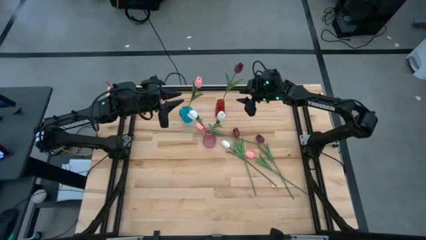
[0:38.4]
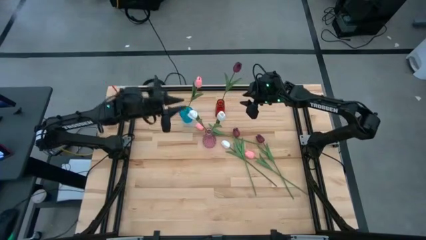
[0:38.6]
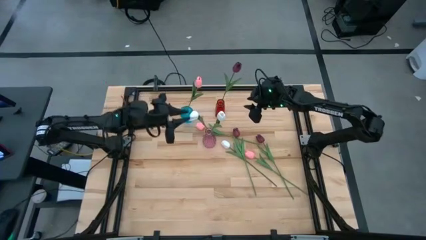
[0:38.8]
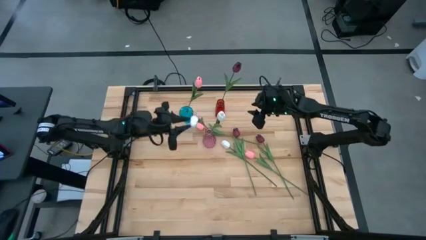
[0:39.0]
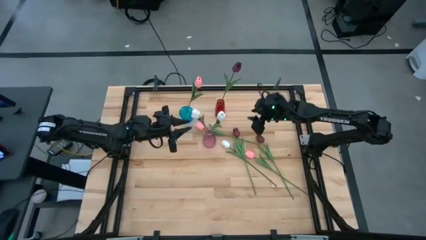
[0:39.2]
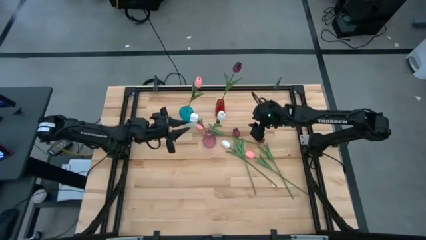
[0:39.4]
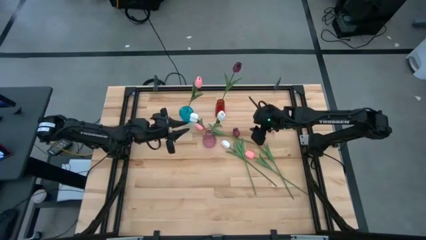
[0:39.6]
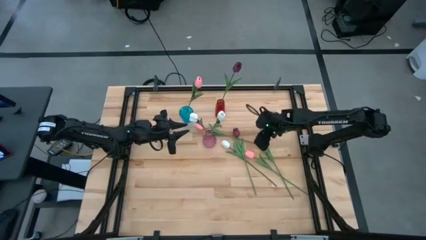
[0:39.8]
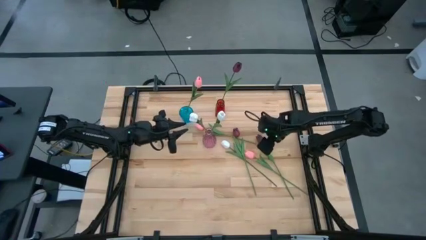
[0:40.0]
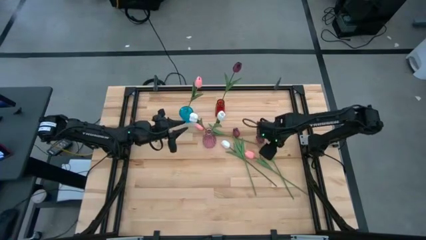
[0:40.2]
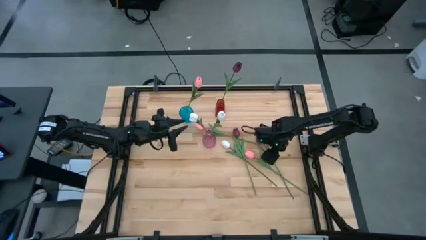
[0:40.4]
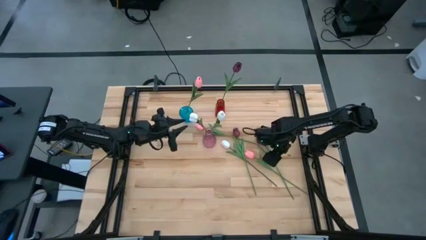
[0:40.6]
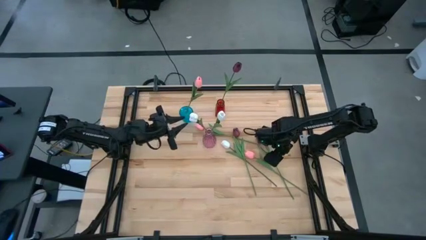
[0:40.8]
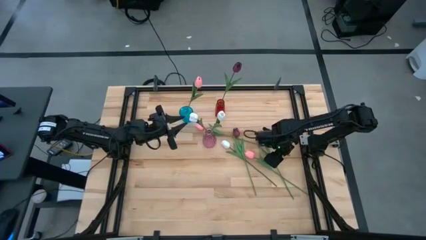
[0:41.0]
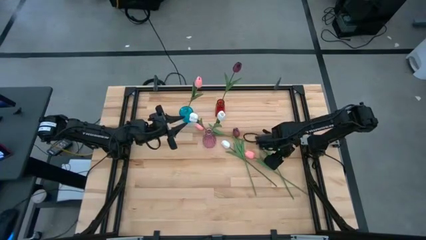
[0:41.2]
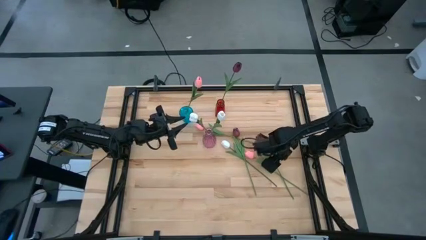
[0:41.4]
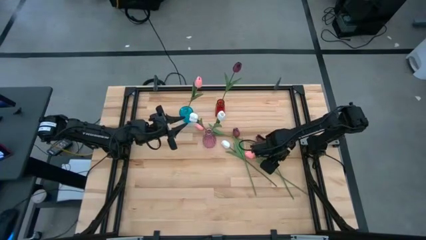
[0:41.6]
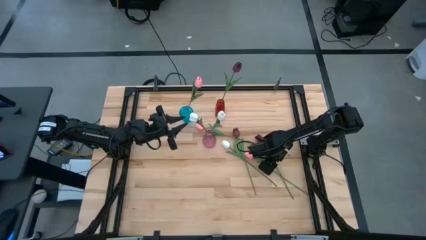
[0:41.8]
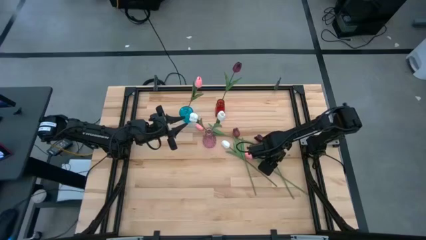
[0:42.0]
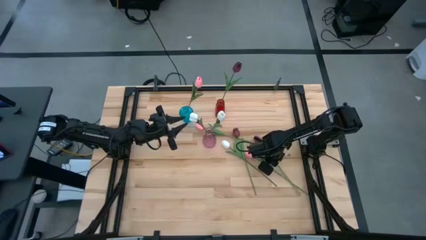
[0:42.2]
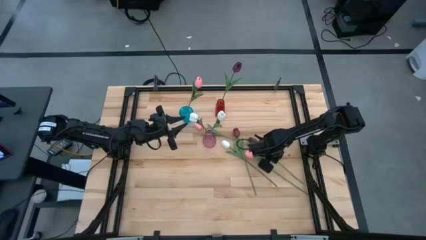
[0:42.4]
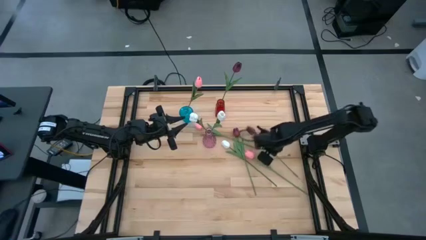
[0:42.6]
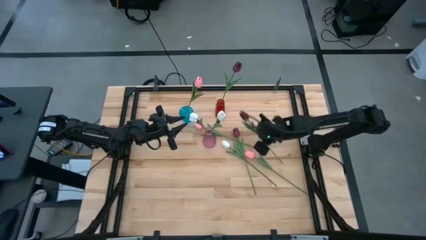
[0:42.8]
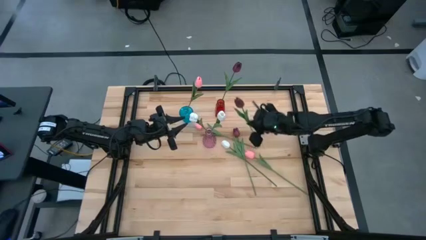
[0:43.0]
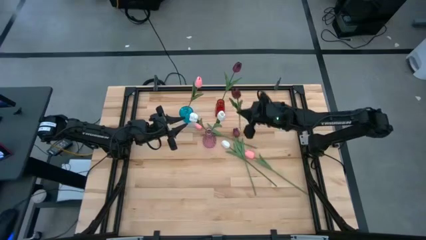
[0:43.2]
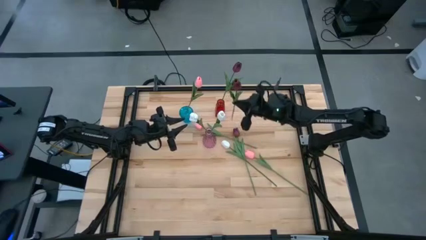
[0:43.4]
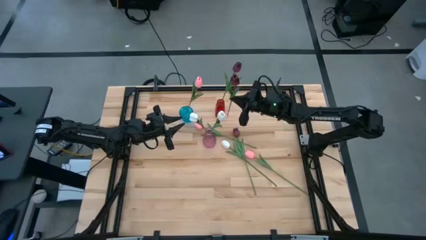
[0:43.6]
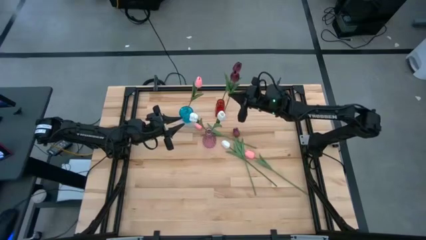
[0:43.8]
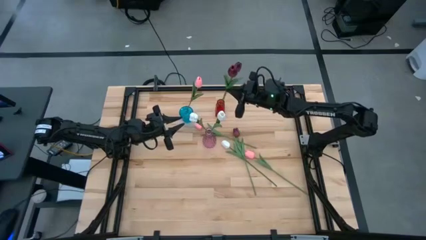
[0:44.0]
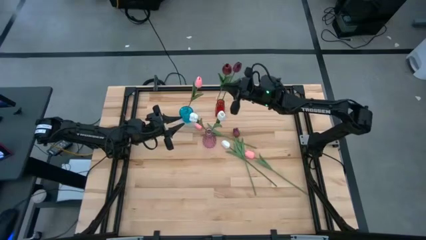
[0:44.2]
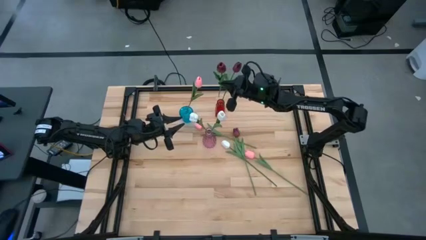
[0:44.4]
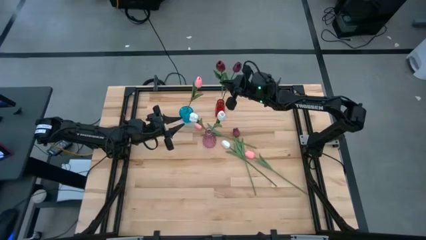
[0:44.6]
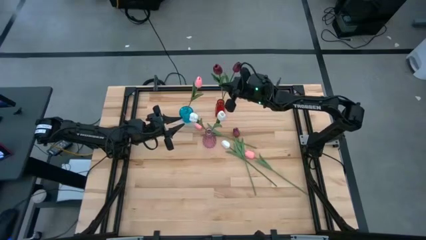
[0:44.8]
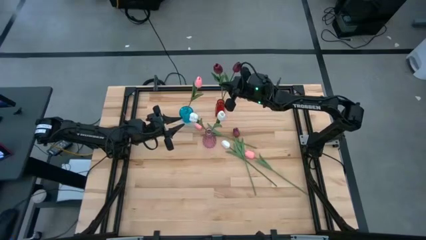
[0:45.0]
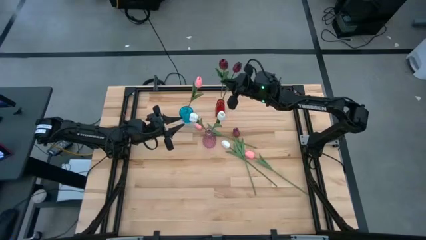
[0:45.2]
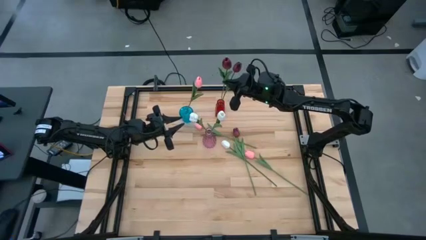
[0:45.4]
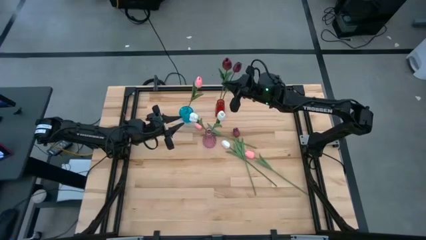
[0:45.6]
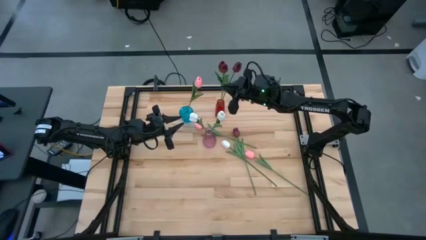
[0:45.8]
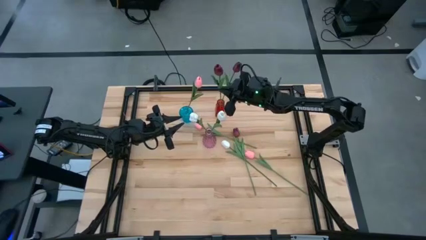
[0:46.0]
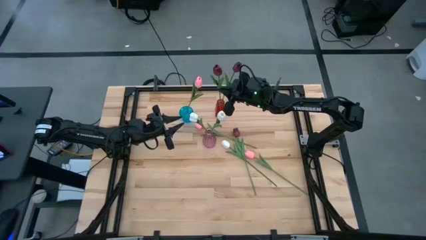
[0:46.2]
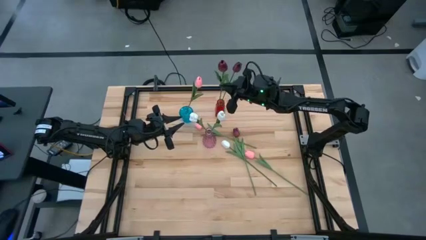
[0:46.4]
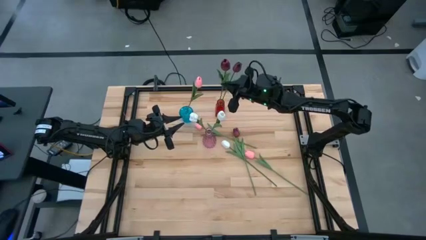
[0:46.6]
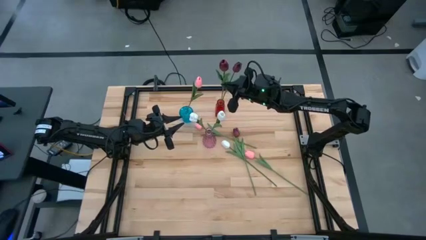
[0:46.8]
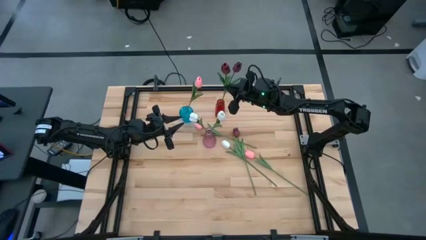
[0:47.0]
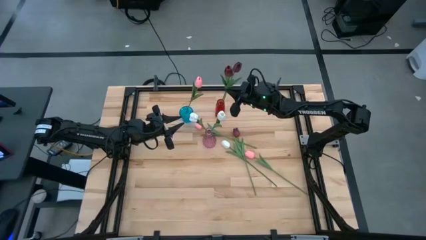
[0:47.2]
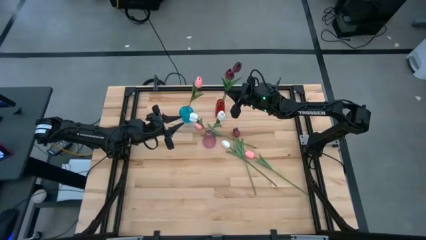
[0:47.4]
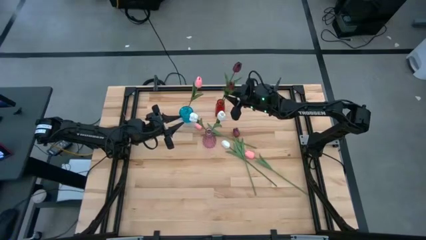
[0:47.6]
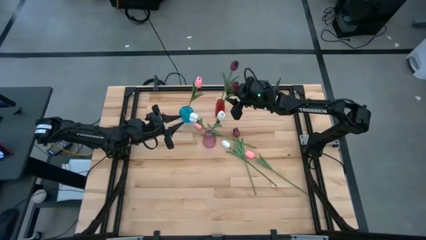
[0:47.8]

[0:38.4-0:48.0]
Task: Sort flowers into vase by color
Put the right red tulip into the red vase

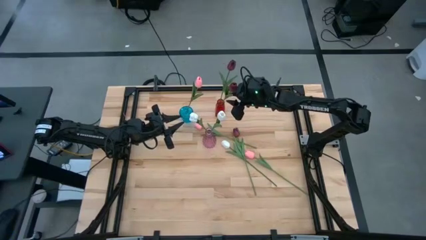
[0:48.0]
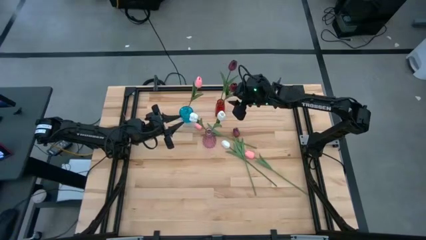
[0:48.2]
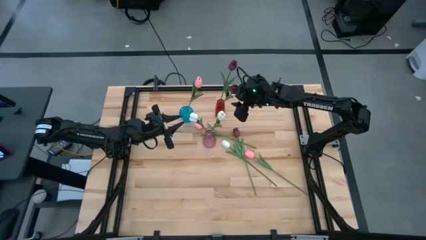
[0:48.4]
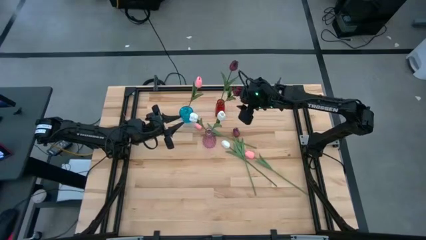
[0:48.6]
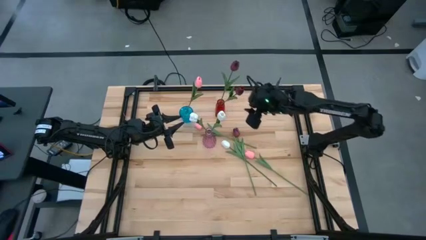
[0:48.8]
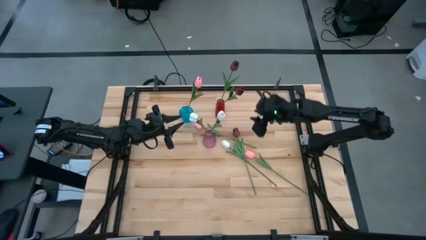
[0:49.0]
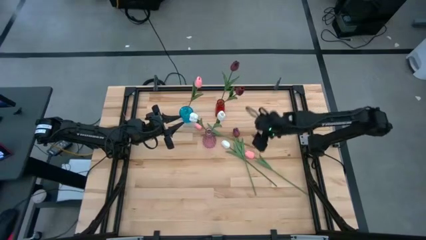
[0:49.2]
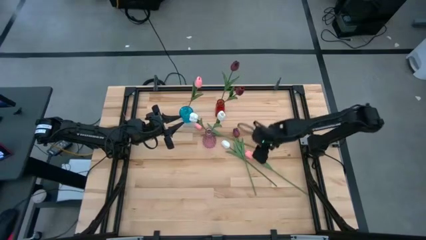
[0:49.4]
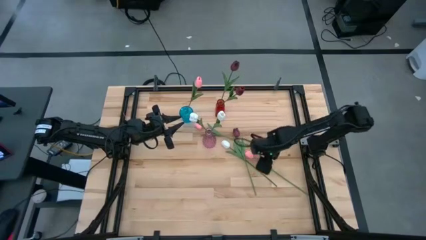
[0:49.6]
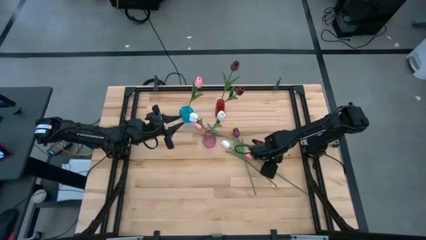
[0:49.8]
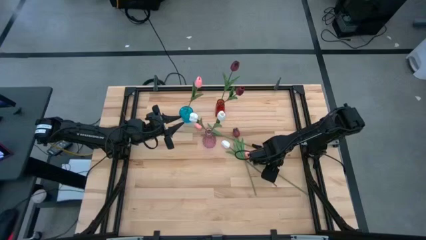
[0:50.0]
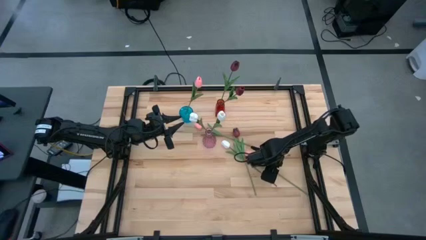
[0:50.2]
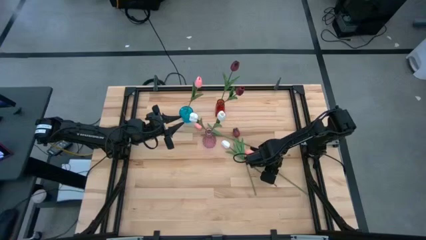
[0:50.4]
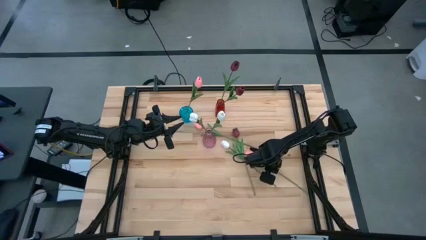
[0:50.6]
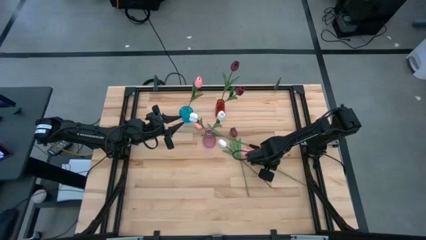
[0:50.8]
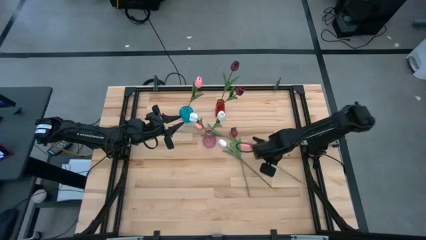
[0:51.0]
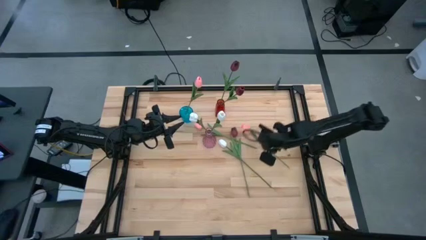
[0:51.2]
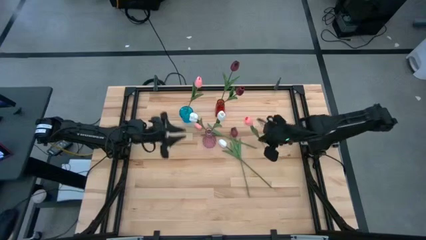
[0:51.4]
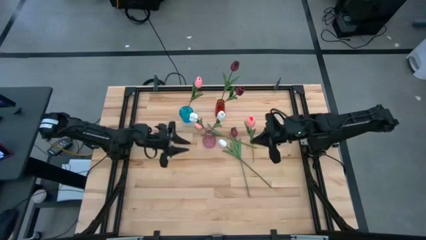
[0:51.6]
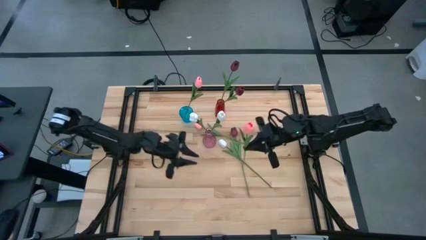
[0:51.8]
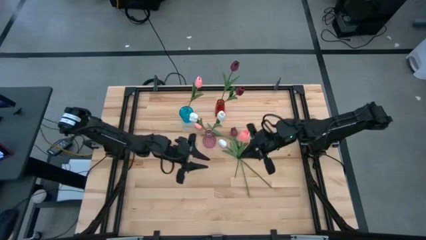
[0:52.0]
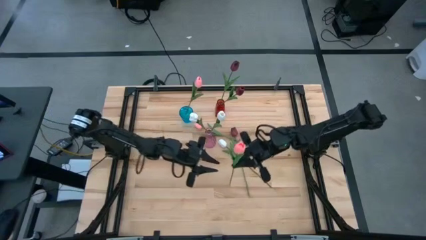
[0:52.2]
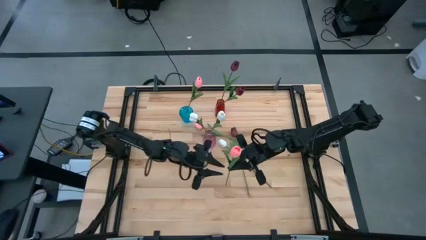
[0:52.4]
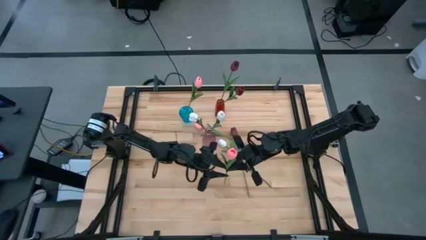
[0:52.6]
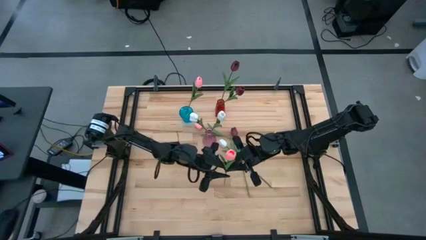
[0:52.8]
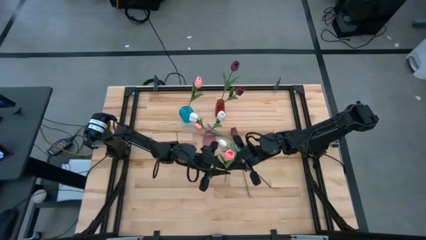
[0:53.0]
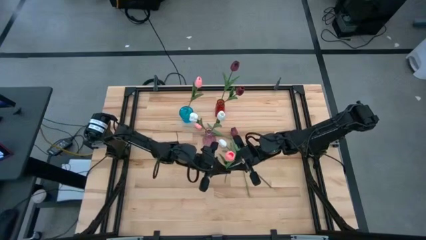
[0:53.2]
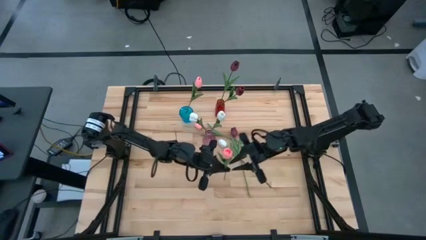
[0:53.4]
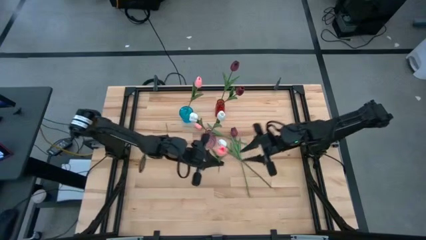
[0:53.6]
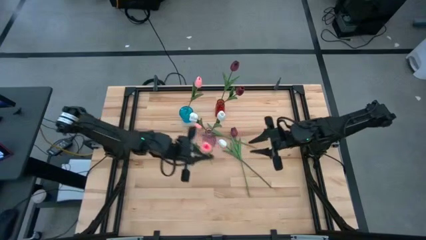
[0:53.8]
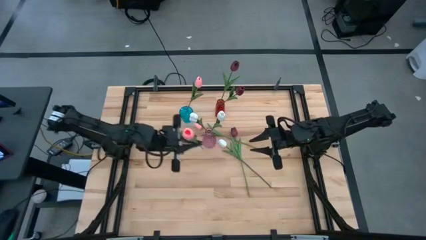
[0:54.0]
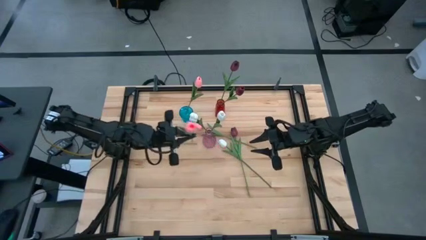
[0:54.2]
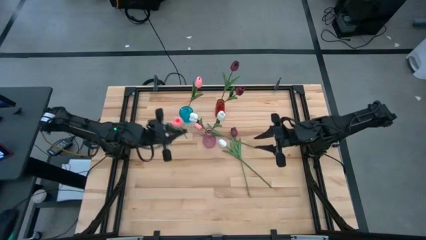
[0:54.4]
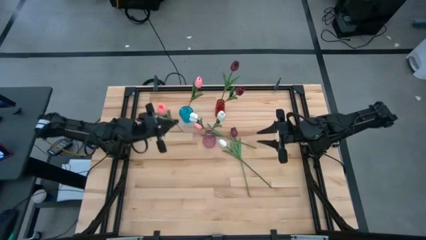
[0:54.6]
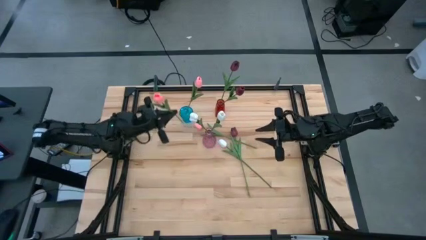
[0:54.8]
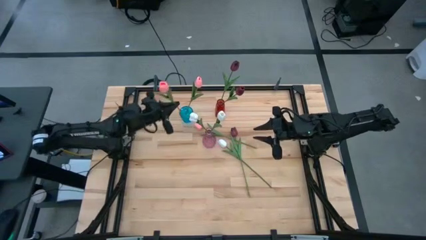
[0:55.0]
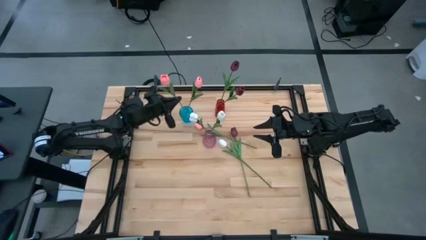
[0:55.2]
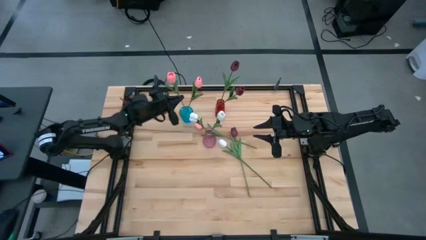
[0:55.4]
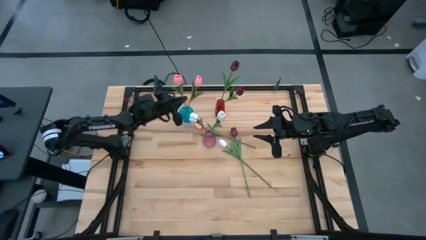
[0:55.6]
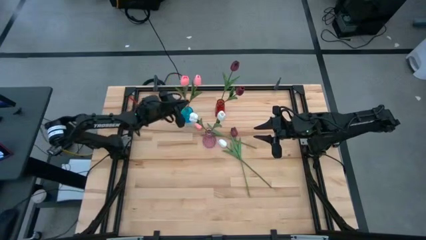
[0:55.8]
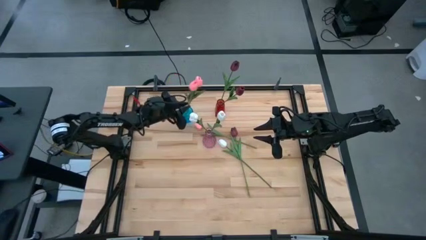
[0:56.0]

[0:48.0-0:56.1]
Put the bottom pink tulip into the blue vase
